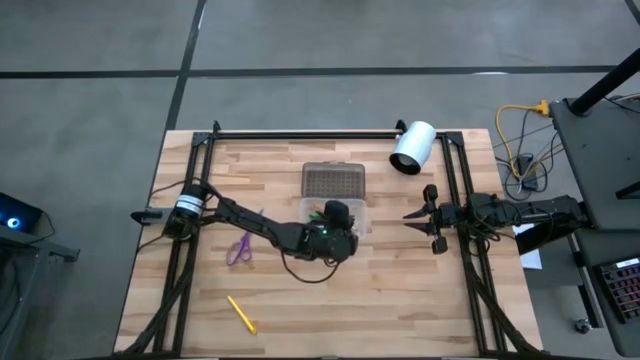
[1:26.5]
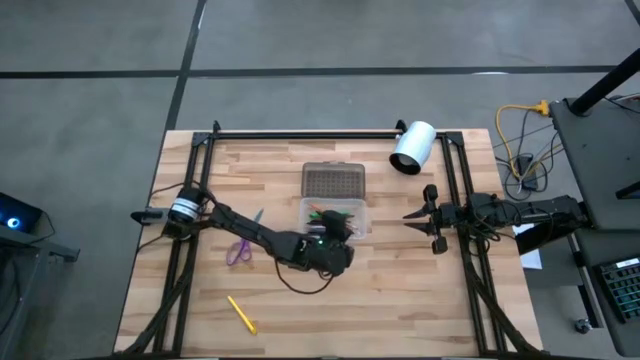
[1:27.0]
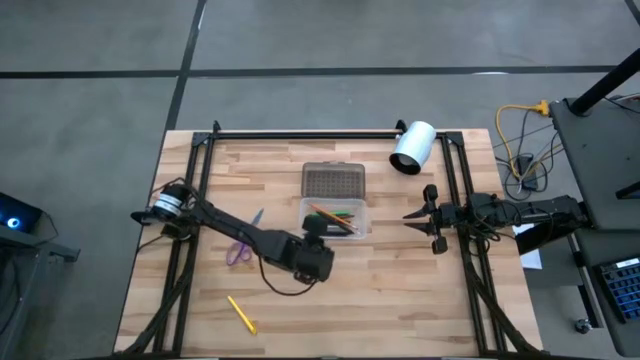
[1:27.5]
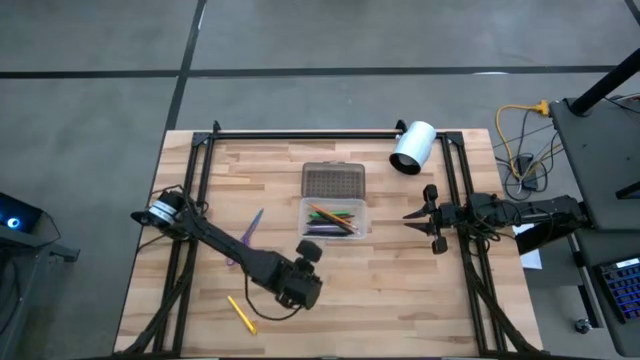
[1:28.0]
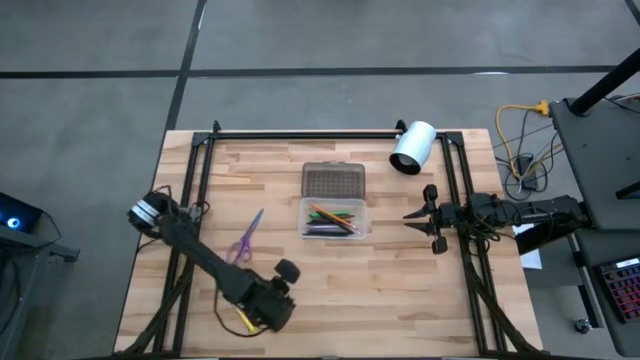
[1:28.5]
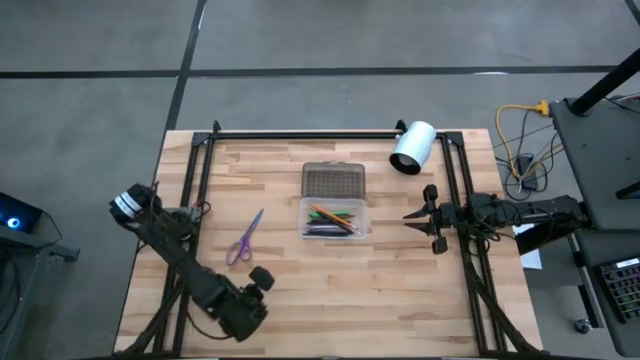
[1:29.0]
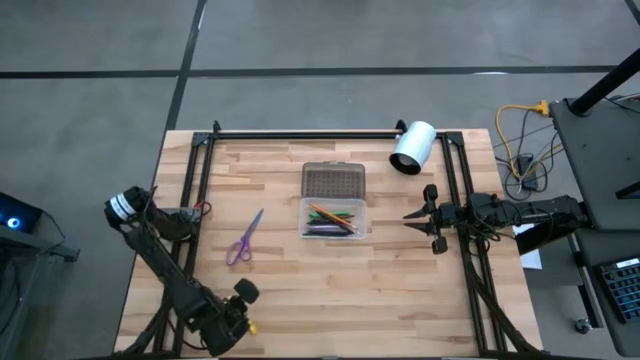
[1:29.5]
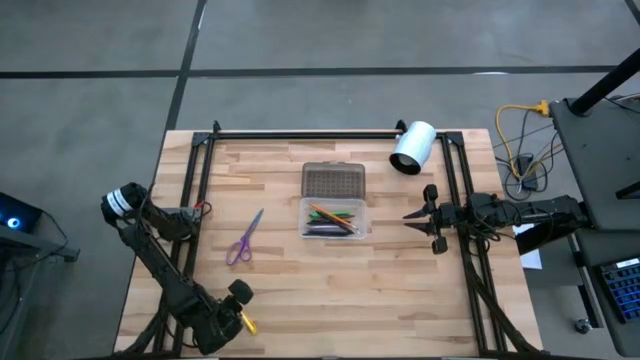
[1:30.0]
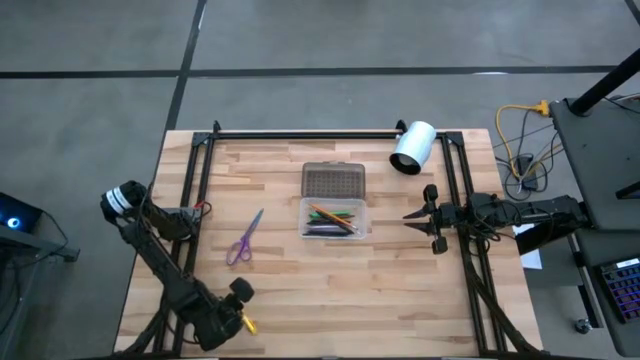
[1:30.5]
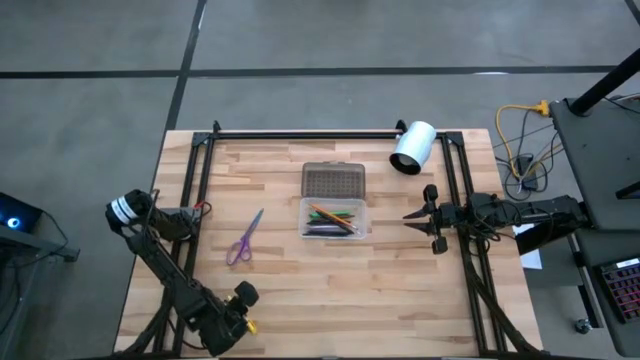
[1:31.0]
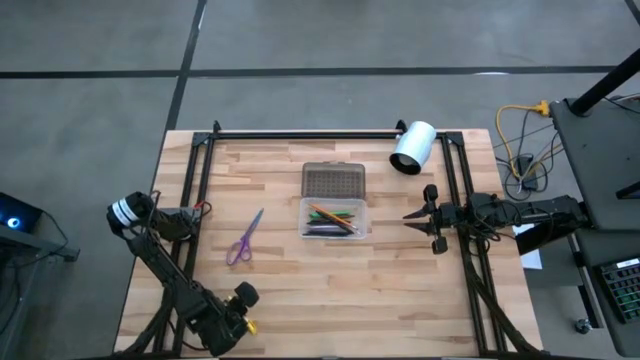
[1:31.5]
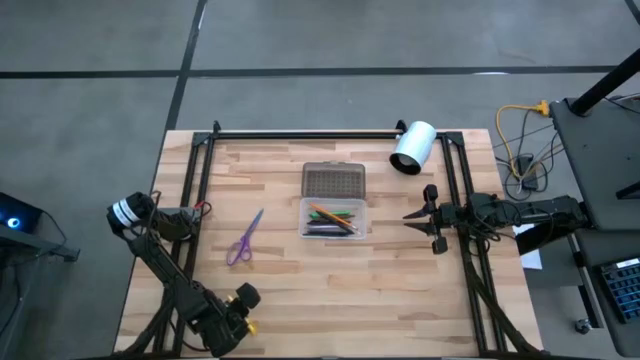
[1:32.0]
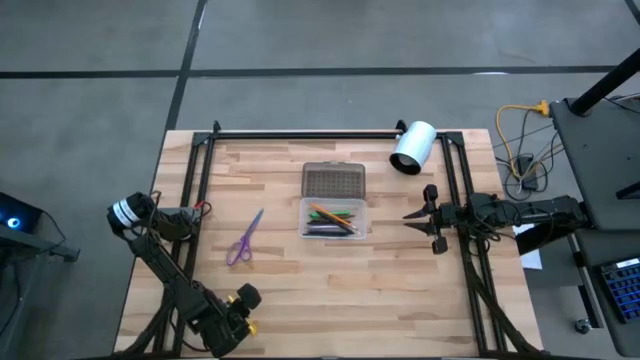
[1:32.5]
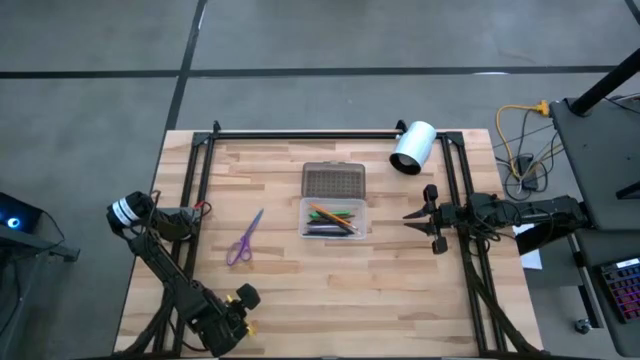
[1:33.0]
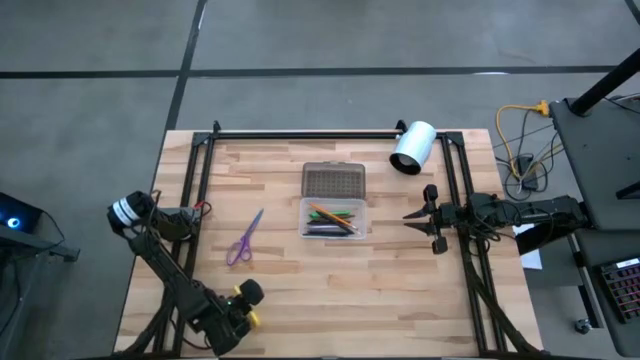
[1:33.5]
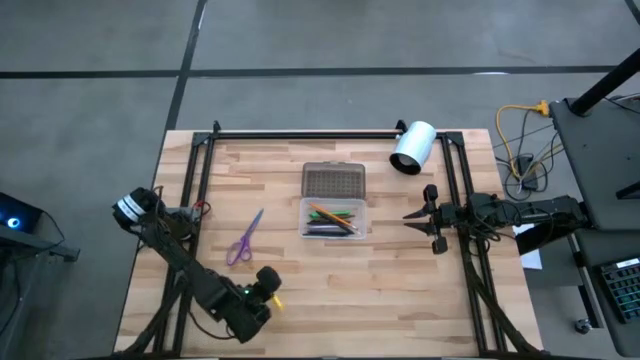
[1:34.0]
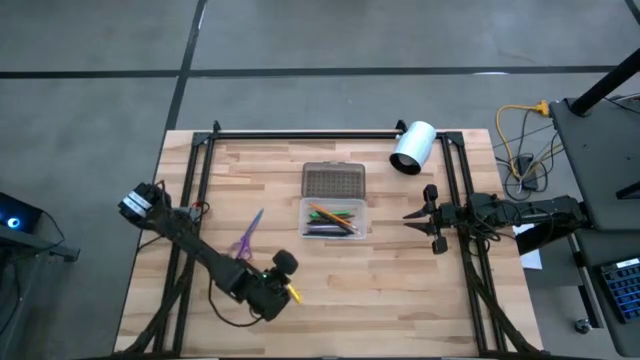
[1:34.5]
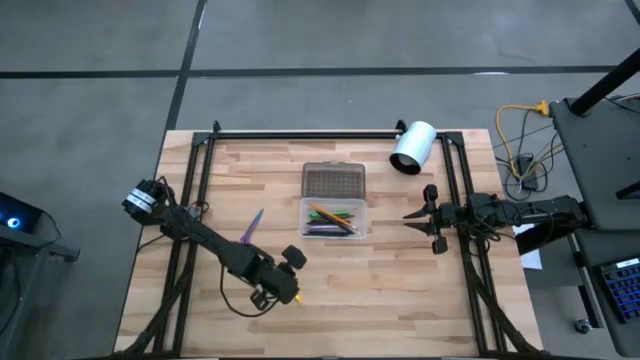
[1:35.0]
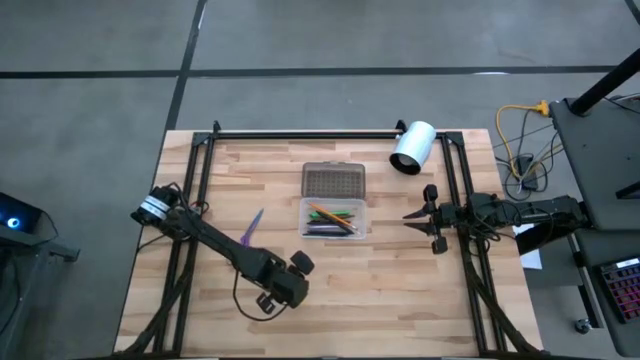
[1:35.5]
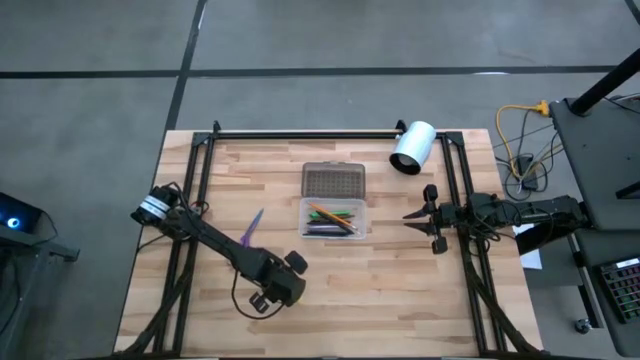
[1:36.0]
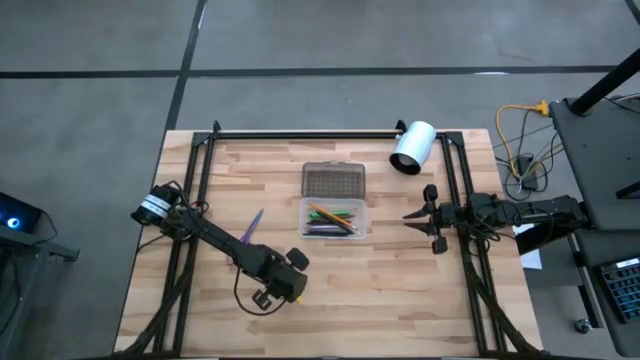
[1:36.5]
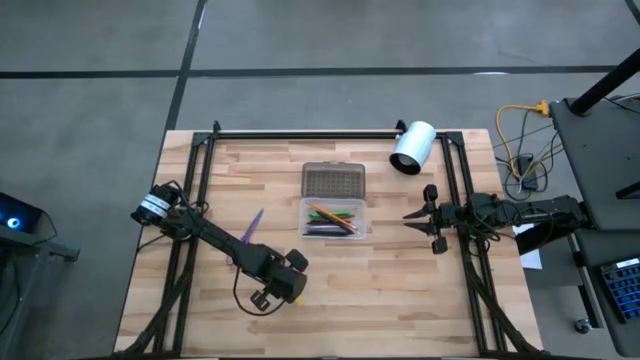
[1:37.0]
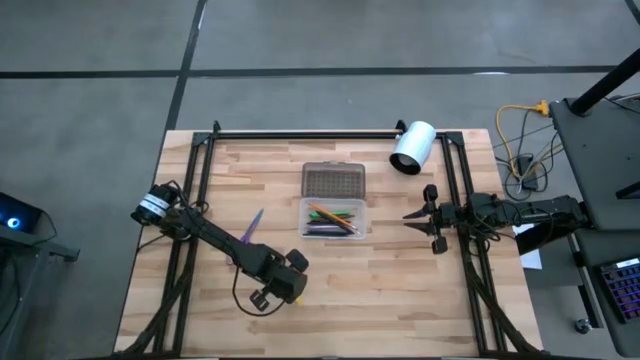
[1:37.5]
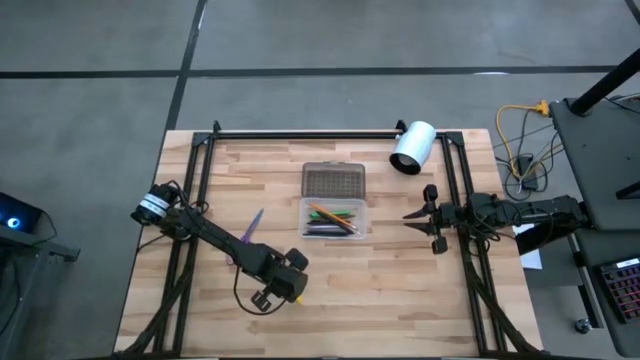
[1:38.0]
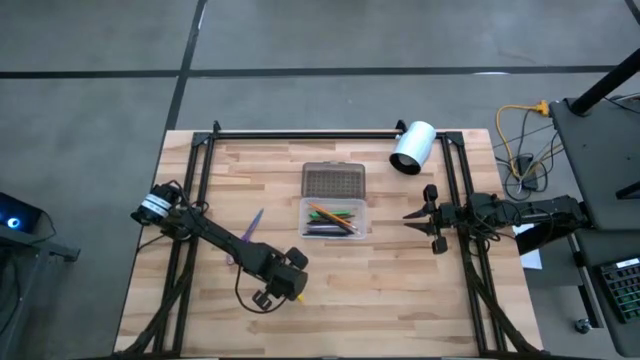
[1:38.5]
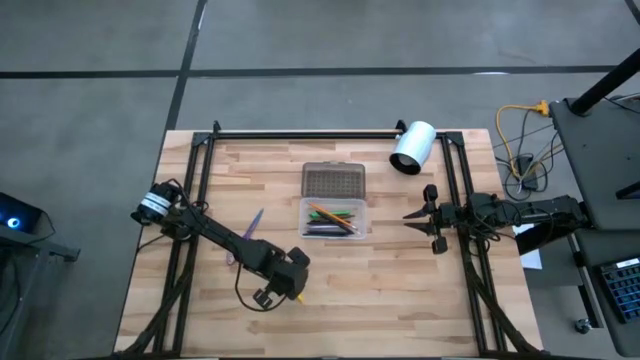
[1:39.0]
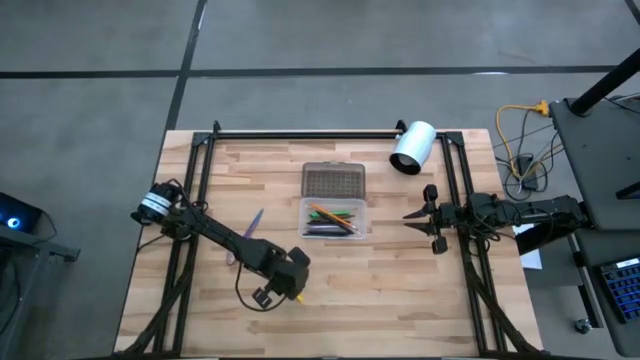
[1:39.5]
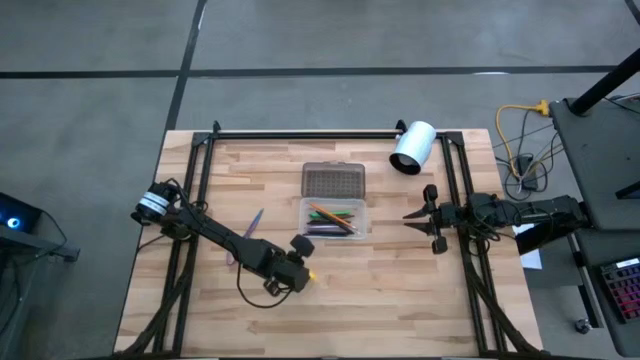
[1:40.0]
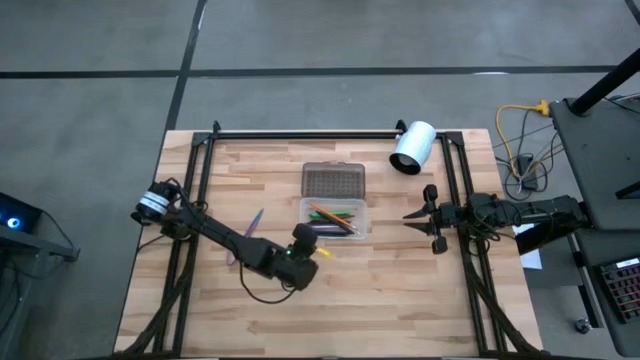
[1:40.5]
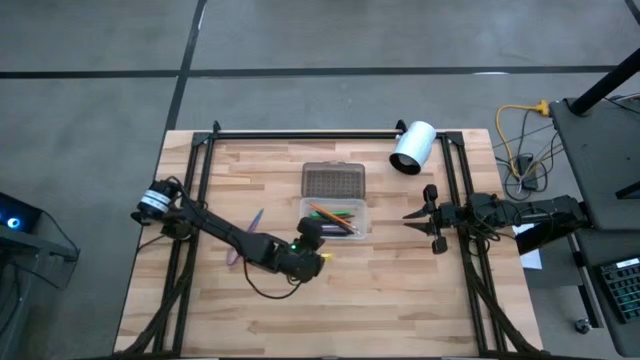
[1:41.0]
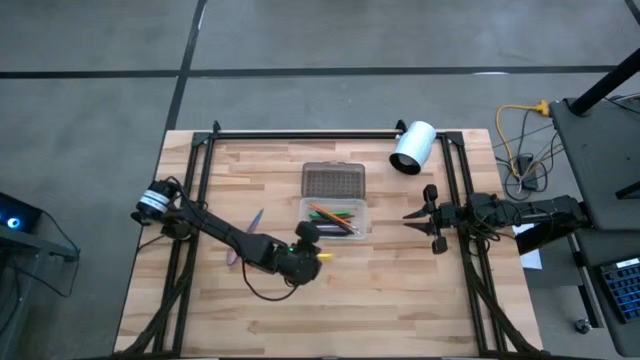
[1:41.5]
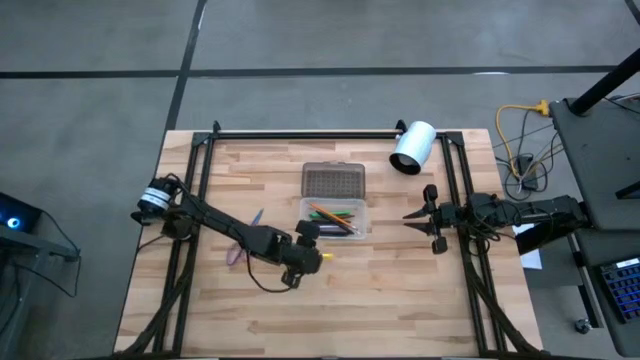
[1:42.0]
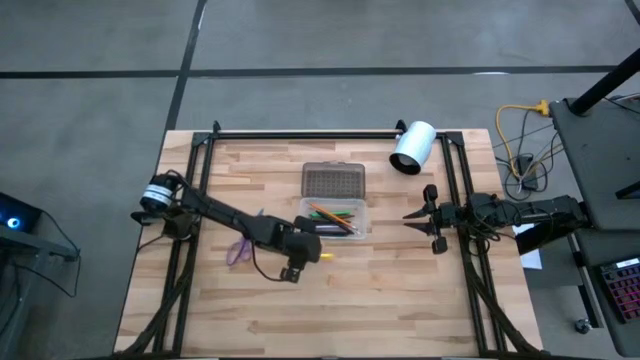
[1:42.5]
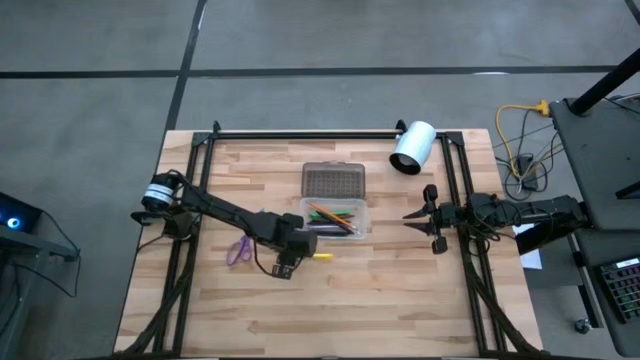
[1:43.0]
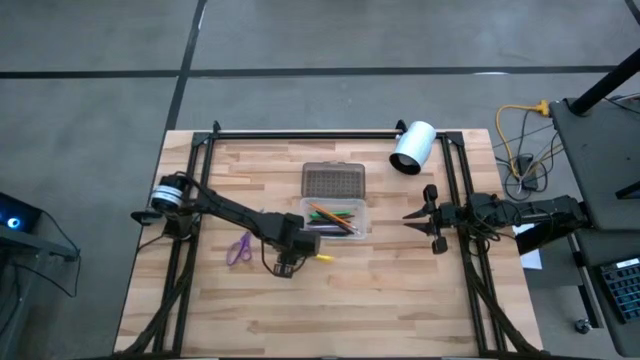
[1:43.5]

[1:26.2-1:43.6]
Task: Pick & place school supplies into a supply box
Put the yellow pen into the white and black supply box

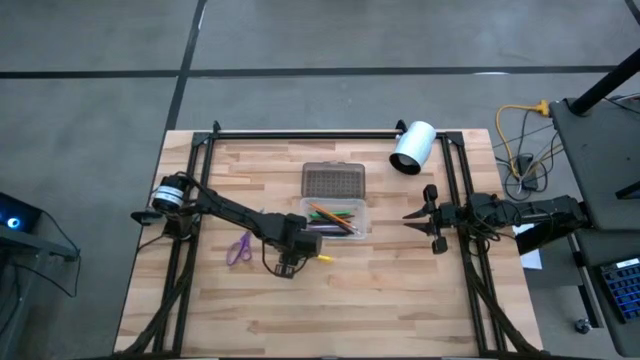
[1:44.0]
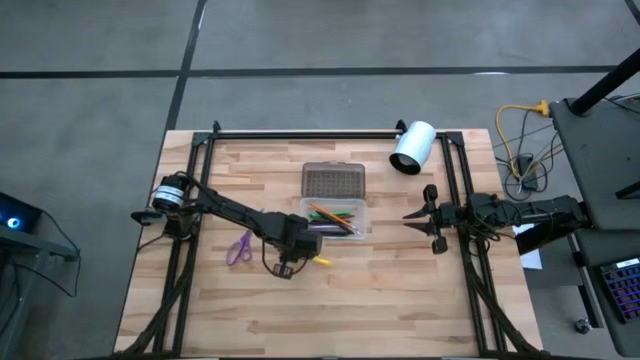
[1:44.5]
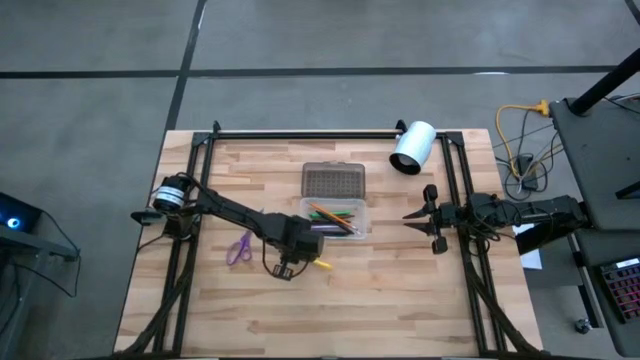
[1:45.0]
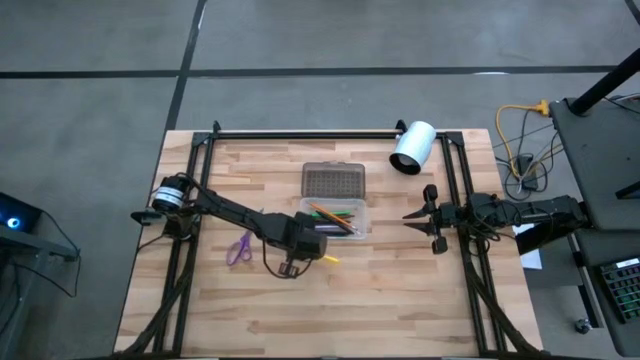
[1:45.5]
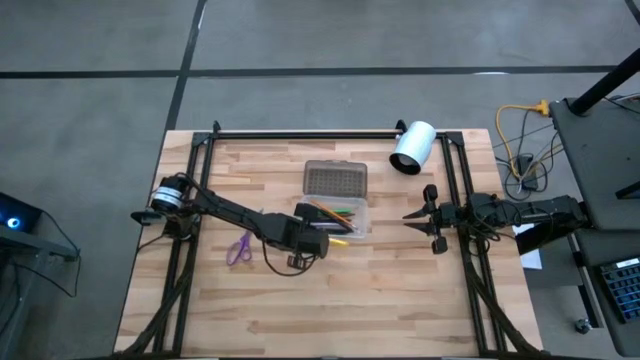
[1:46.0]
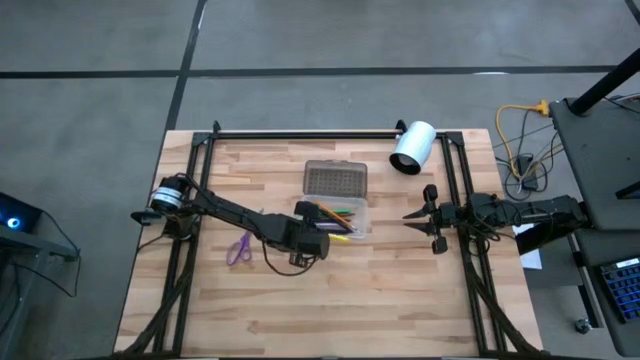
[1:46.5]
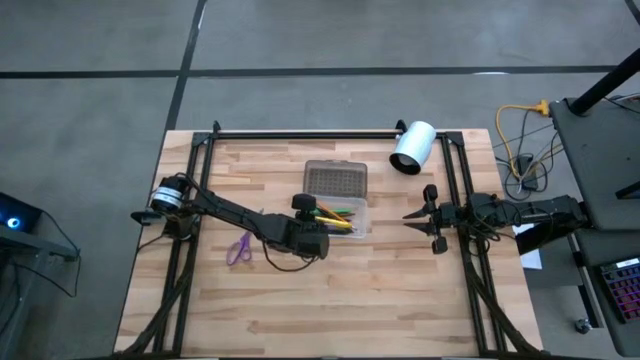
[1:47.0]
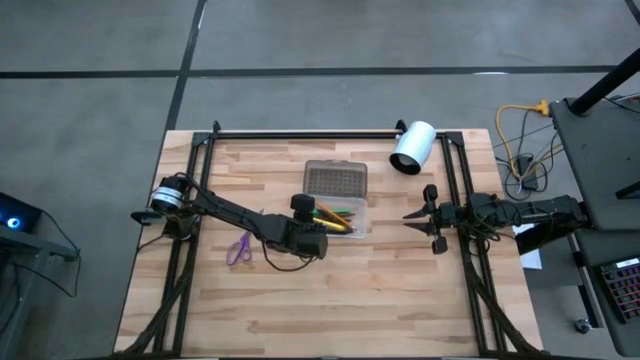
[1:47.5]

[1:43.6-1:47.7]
Put the yellow pen into the white and black supply box
